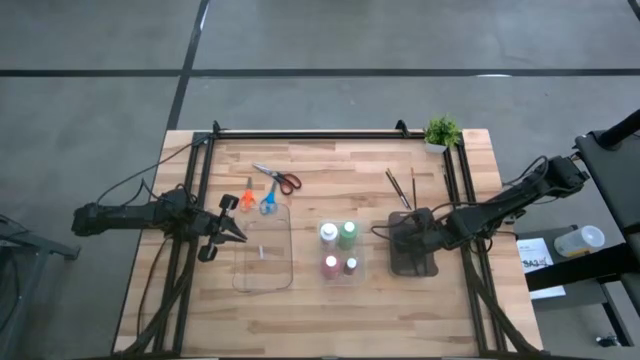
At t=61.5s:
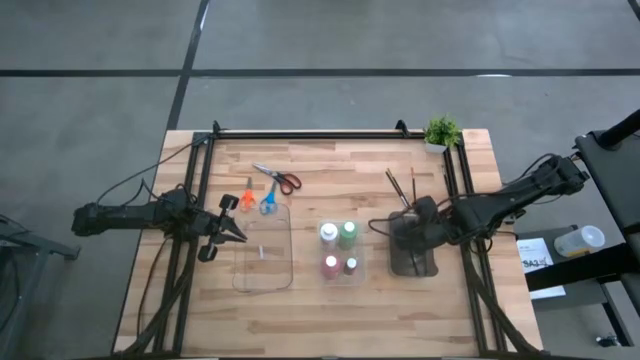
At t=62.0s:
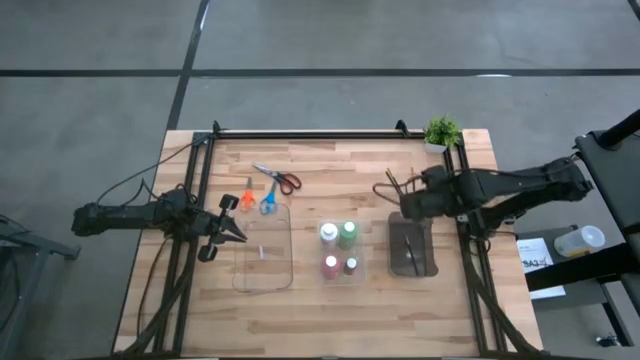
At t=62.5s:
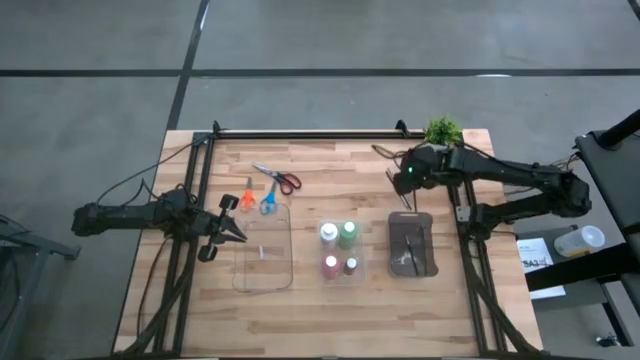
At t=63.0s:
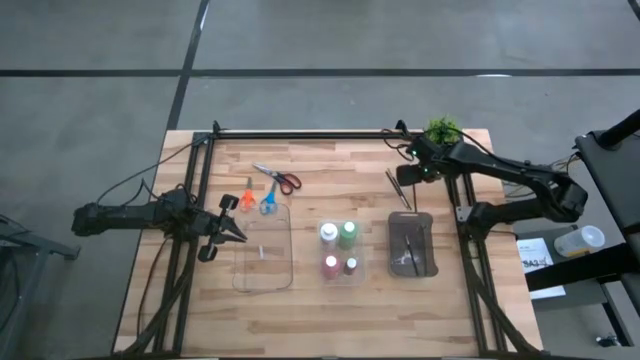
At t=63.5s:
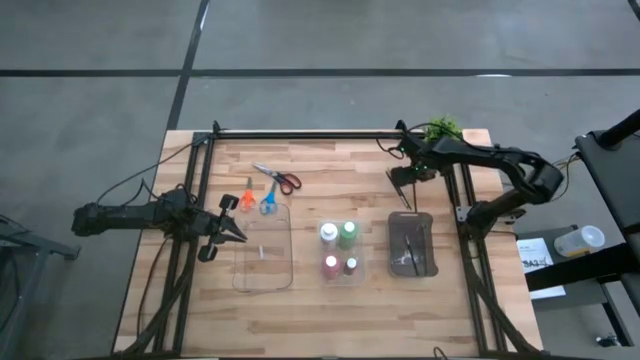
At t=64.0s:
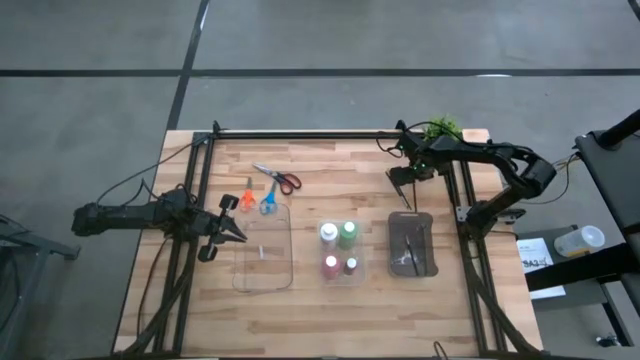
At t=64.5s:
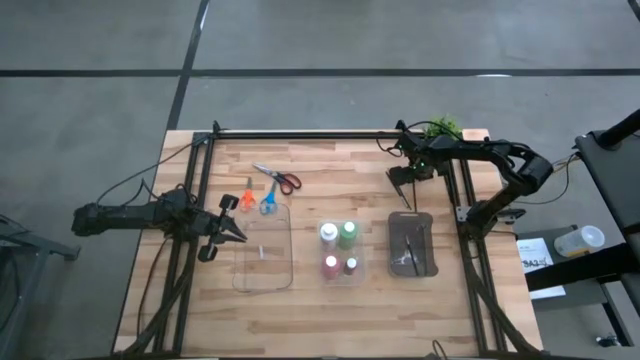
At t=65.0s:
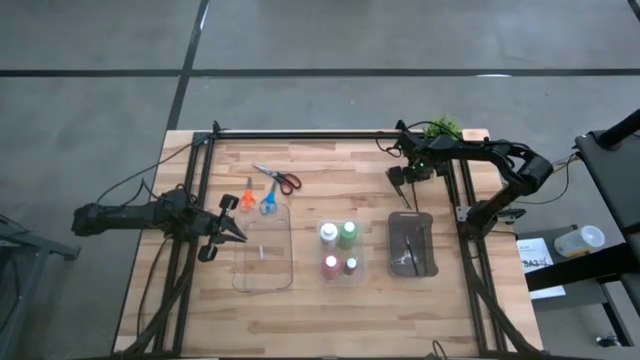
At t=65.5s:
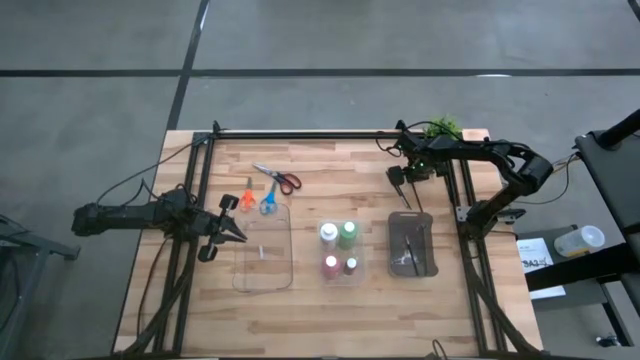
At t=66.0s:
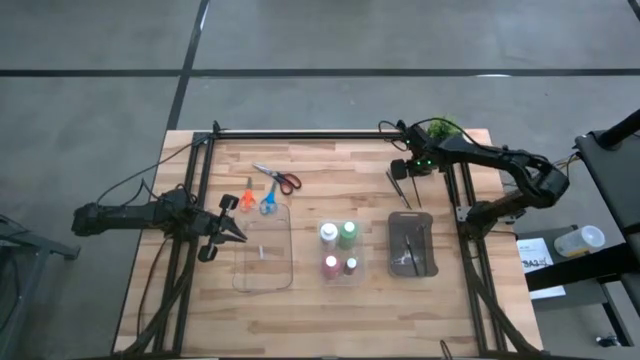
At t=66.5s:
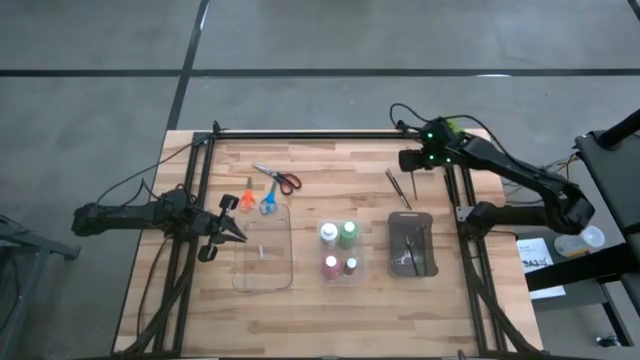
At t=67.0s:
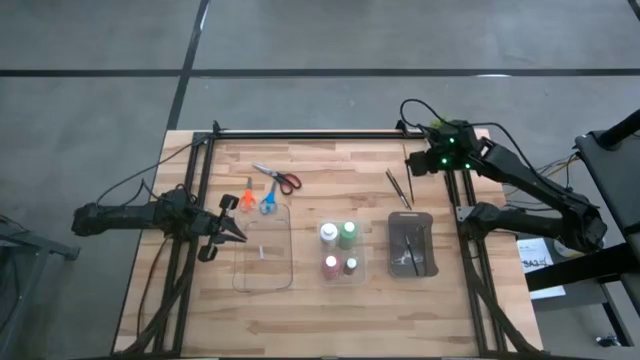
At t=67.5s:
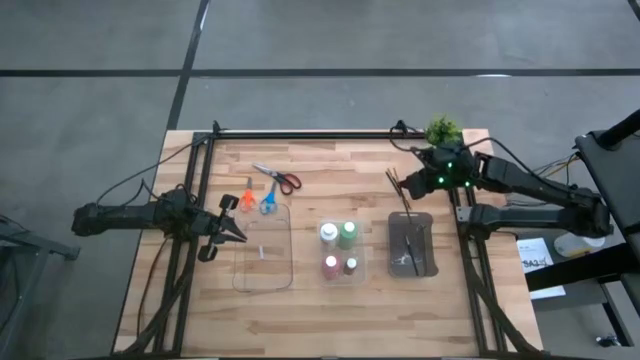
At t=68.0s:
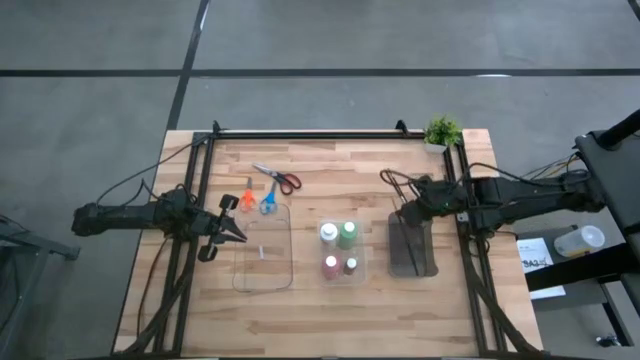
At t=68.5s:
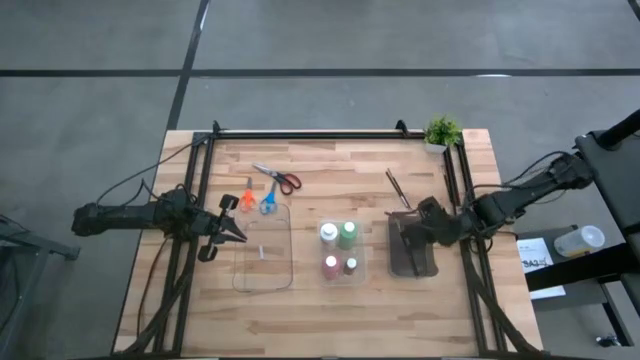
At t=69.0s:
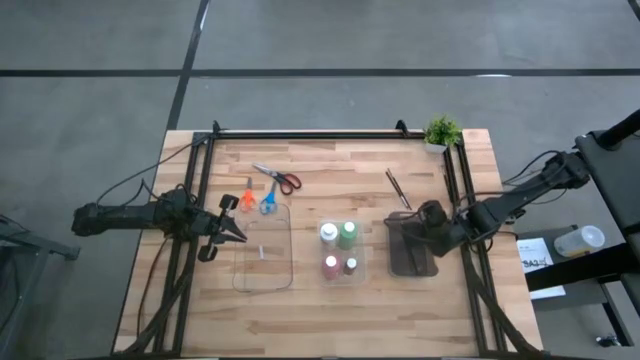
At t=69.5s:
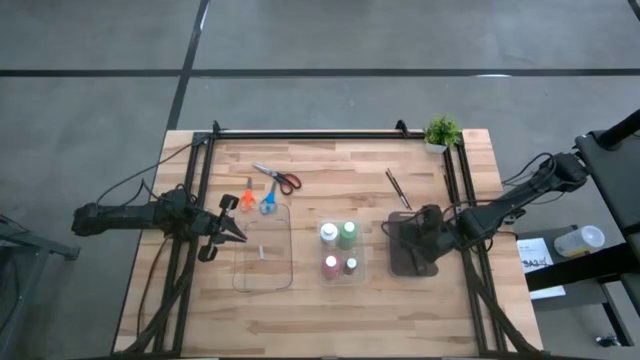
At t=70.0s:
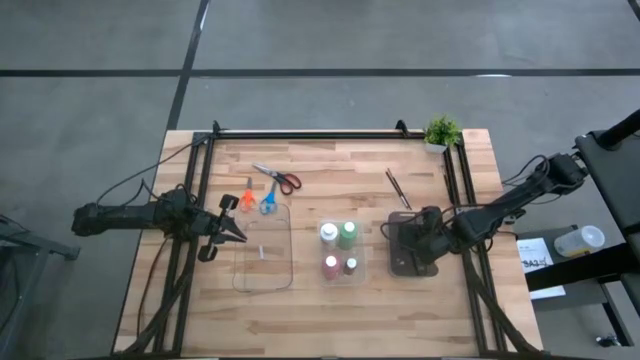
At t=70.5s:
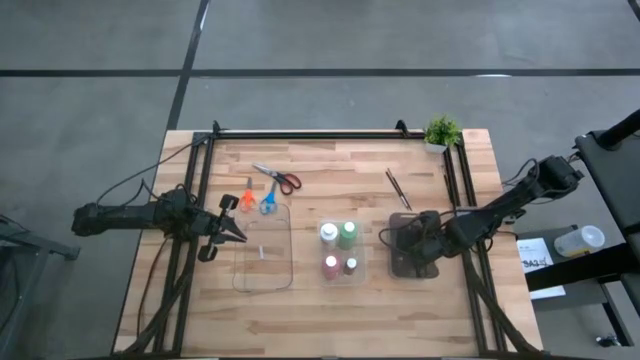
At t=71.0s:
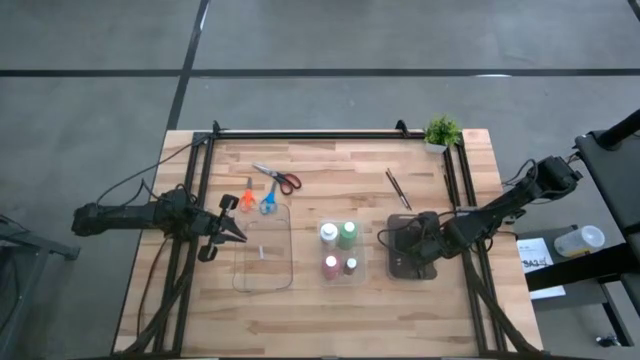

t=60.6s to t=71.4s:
Task: Pick & Place Paint Supplies
Put the right gold paintbrush into the black bin

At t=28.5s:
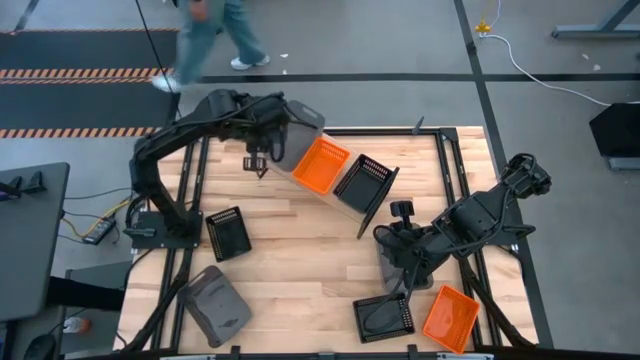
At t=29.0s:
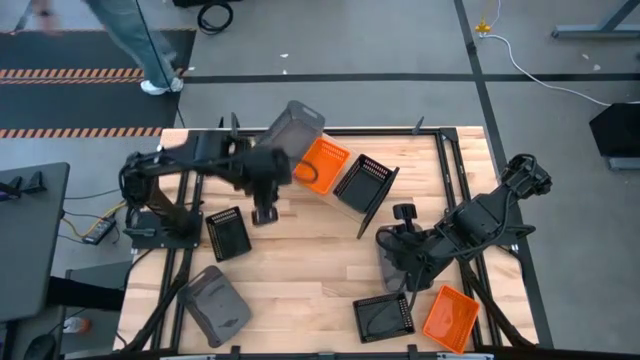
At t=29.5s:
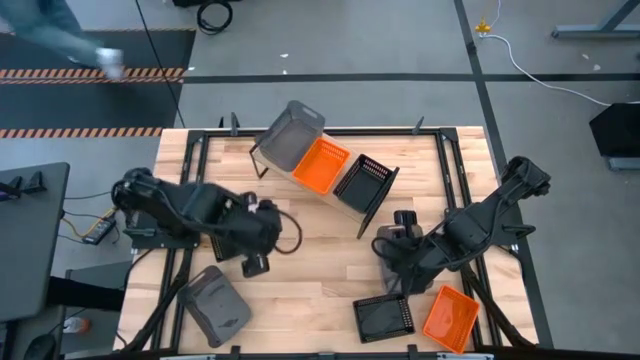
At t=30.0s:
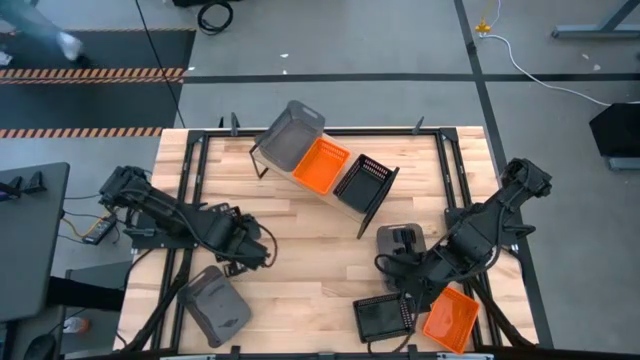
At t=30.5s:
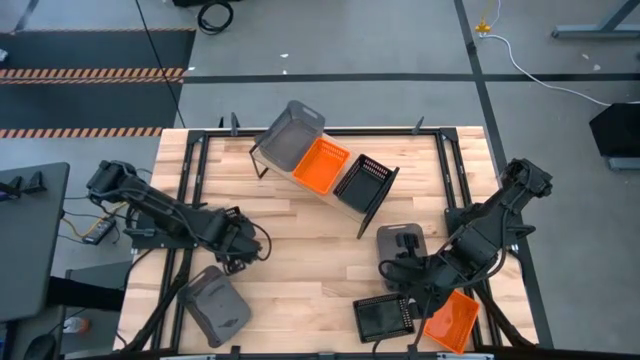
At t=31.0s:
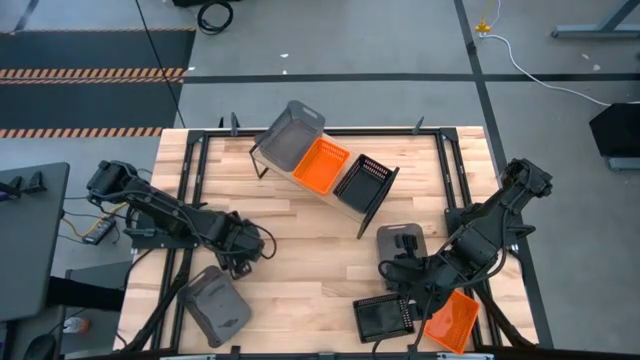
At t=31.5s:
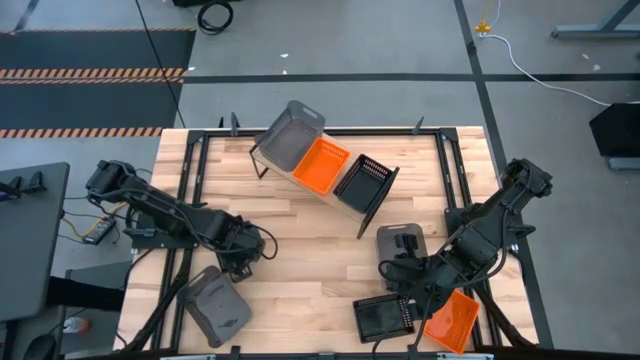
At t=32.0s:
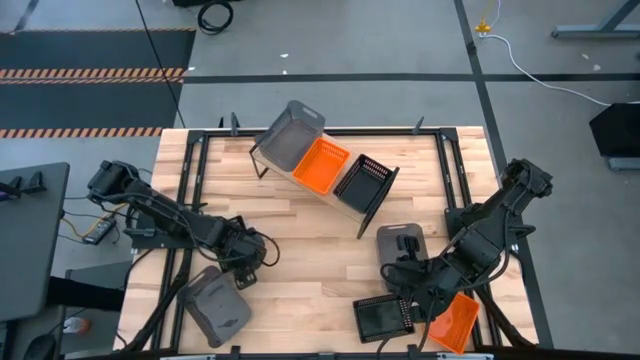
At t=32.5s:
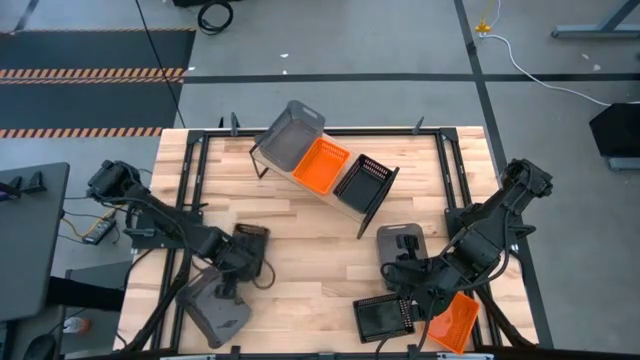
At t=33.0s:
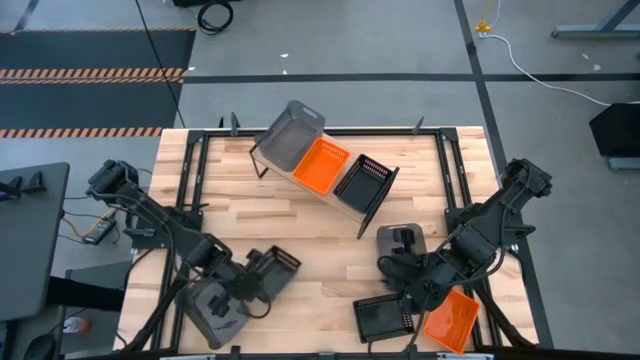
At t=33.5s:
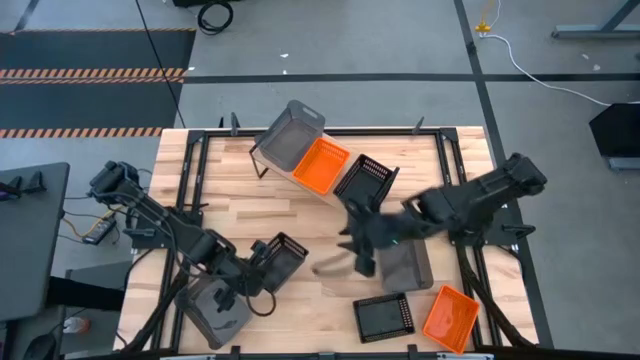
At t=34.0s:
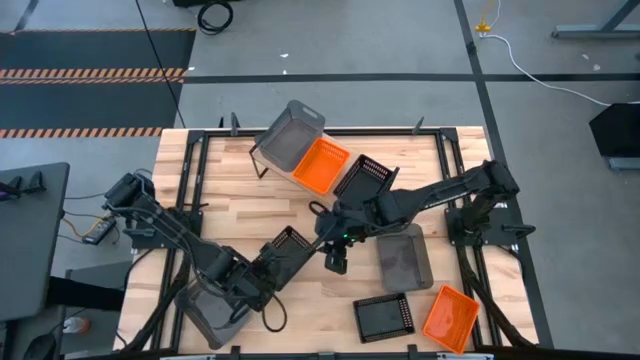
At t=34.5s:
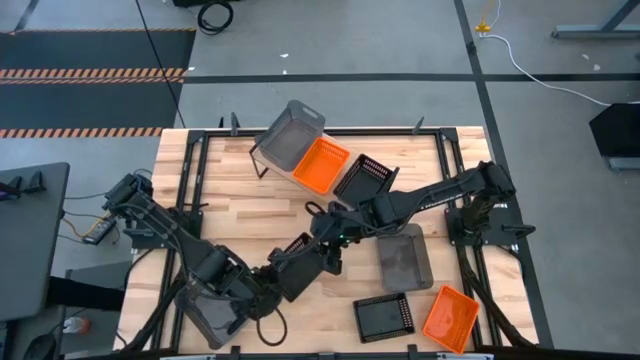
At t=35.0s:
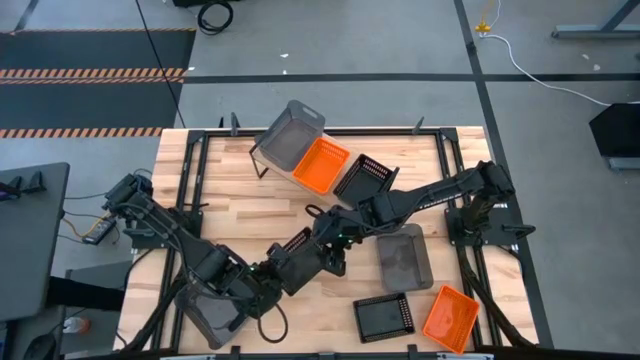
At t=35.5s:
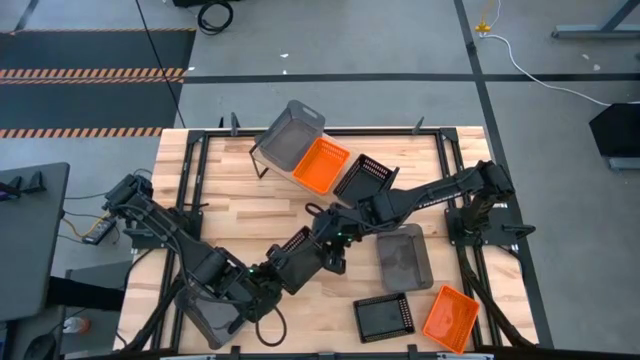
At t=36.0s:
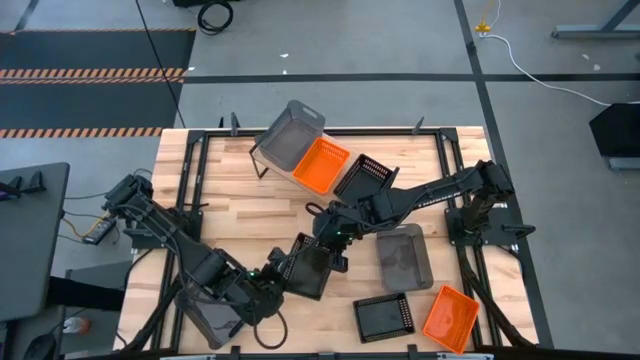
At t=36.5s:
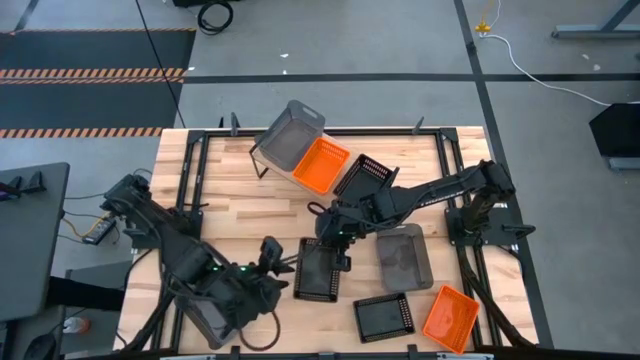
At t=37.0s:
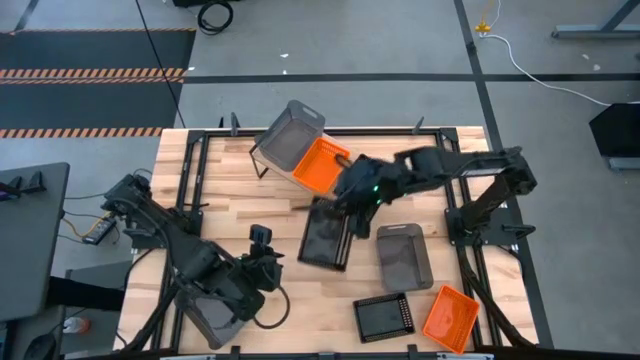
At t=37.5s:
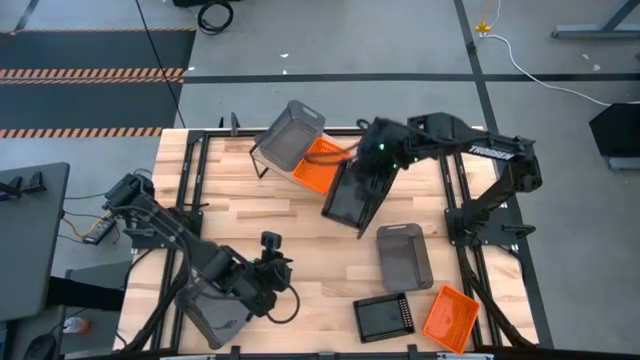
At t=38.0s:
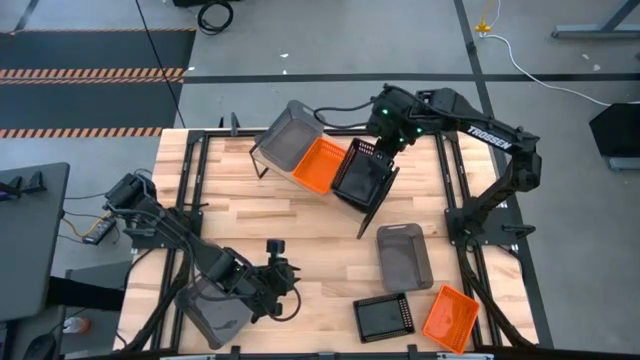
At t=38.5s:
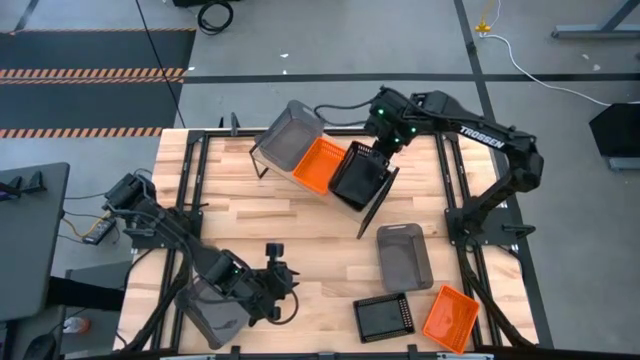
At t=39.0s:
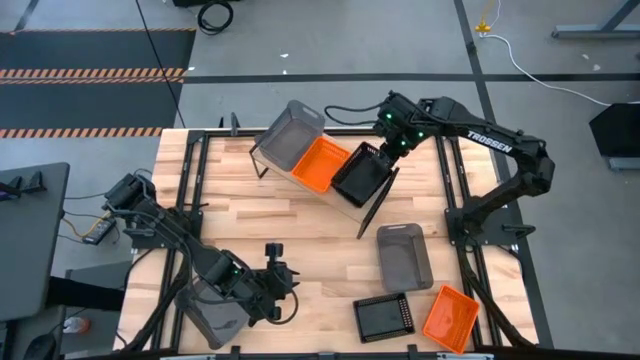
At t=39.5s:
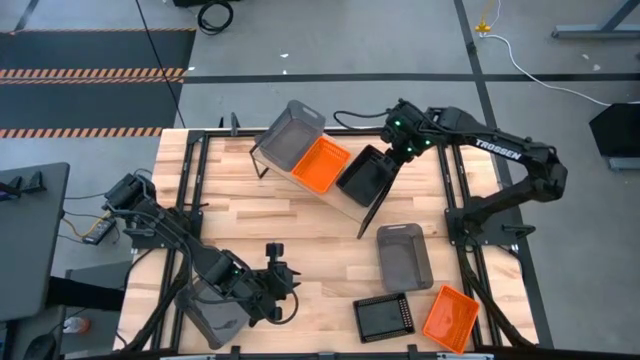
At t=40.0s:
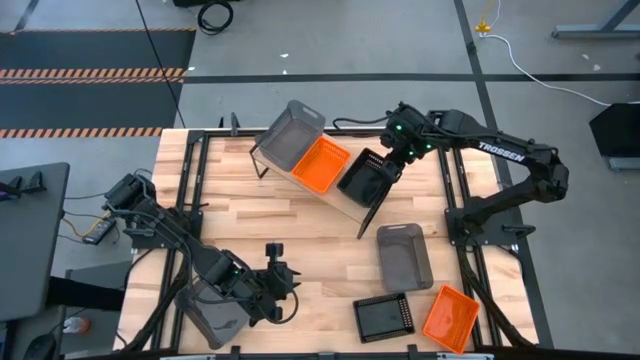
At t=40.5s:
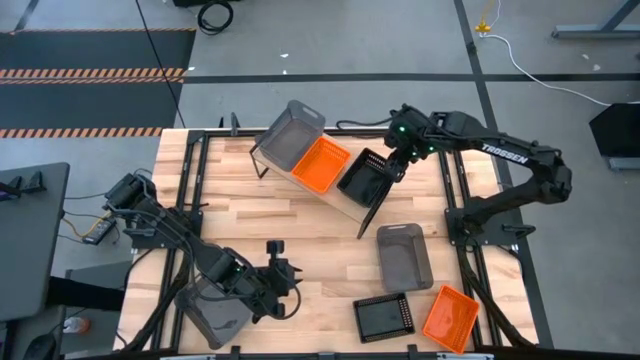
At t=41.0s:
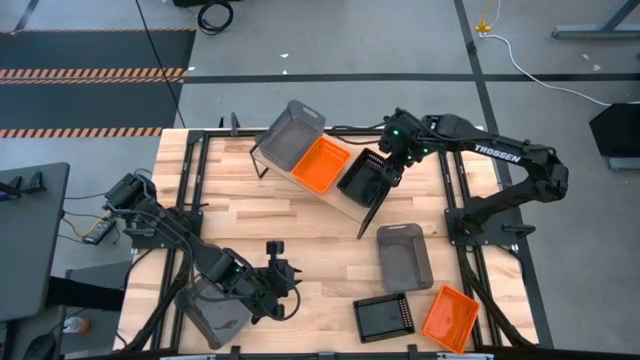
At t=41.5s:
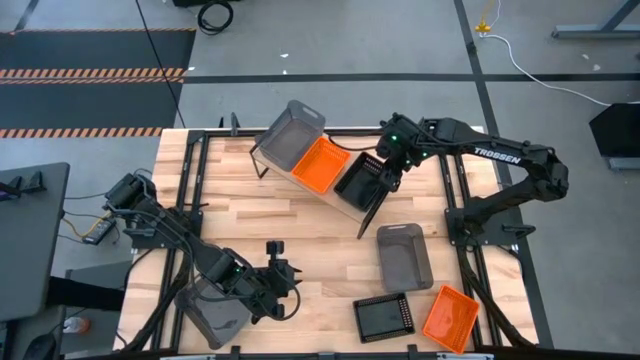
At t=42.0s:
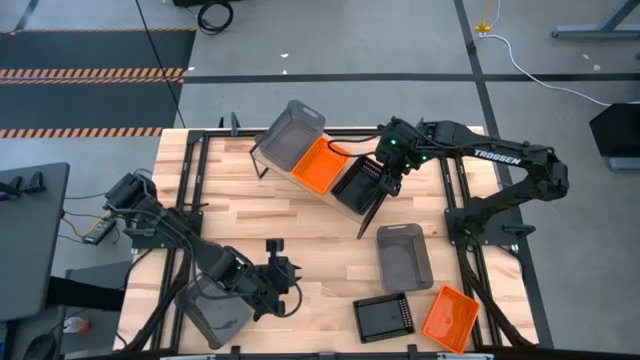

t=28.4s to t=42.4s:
Task: Stack baskets on shelf by color
Stack the top black basket on top of the other black basket on the shelf
